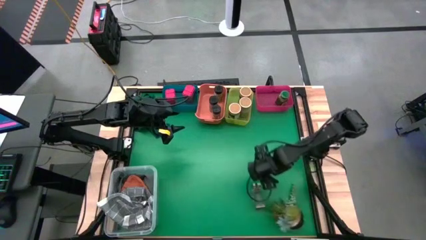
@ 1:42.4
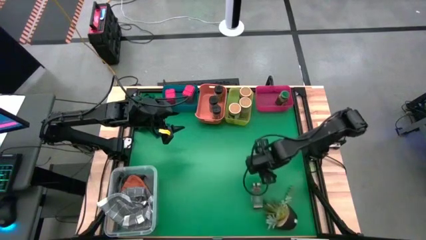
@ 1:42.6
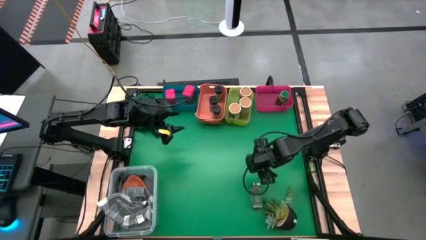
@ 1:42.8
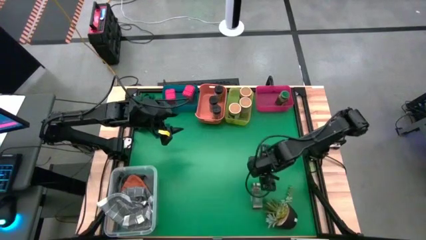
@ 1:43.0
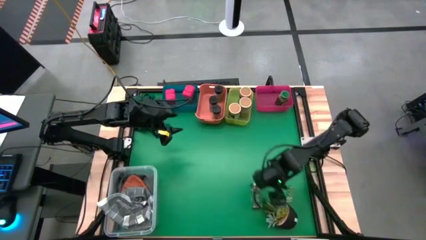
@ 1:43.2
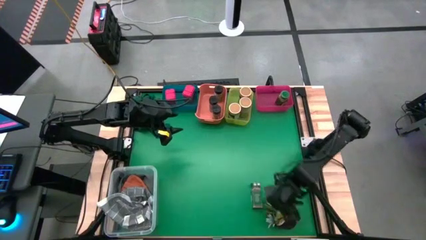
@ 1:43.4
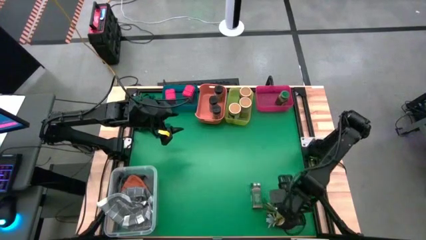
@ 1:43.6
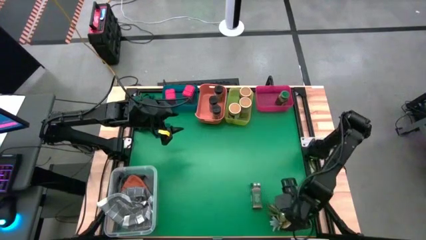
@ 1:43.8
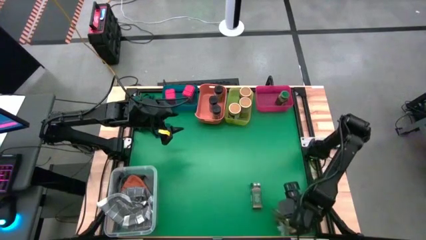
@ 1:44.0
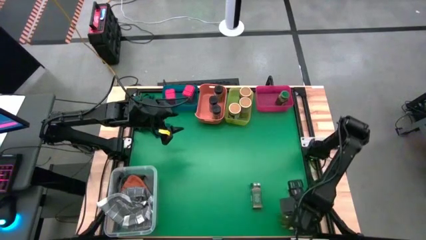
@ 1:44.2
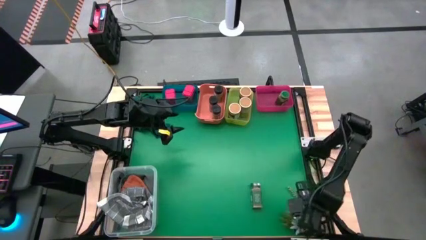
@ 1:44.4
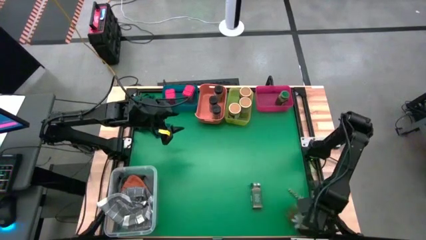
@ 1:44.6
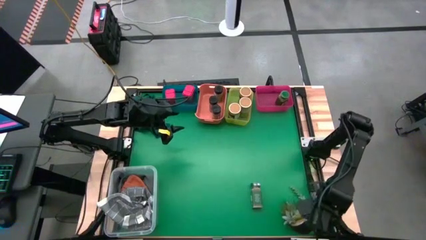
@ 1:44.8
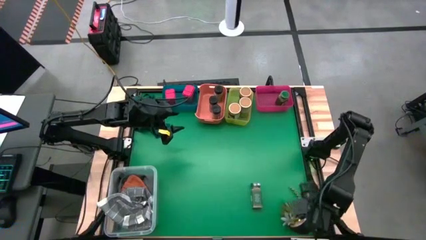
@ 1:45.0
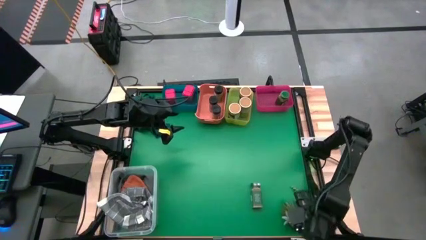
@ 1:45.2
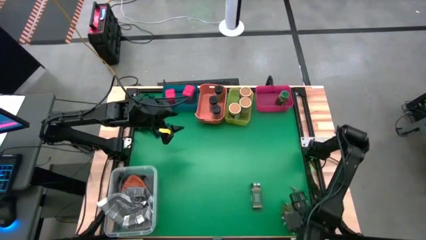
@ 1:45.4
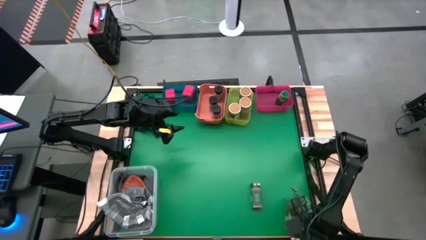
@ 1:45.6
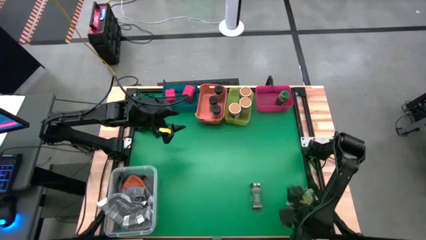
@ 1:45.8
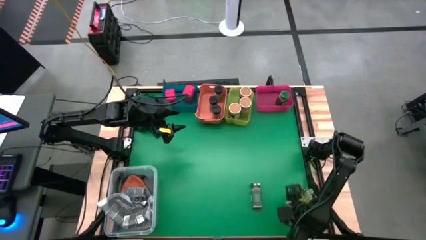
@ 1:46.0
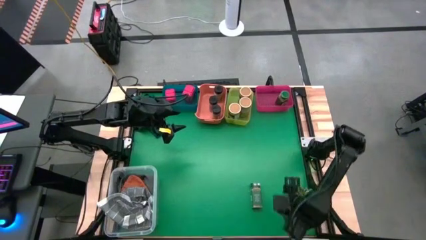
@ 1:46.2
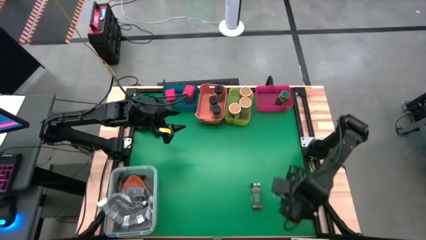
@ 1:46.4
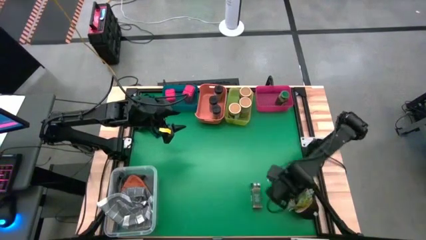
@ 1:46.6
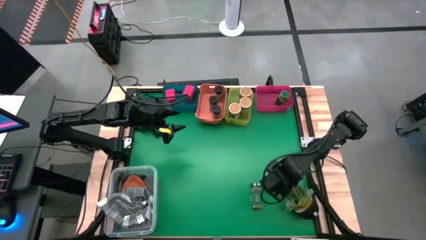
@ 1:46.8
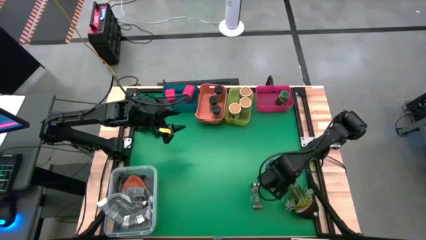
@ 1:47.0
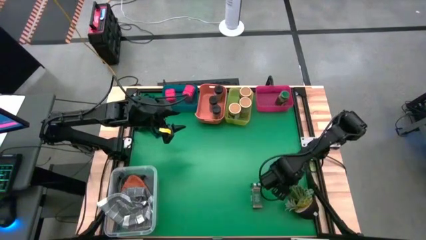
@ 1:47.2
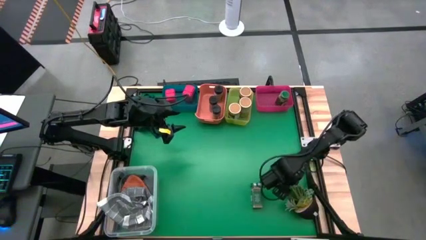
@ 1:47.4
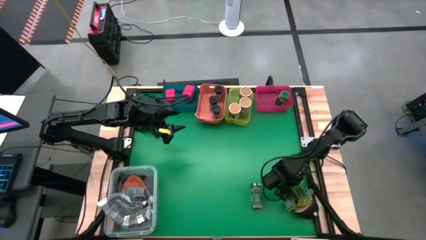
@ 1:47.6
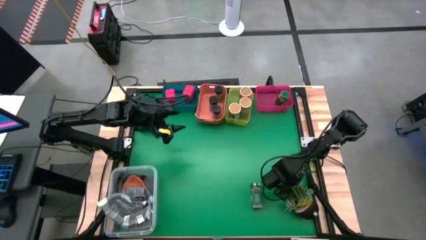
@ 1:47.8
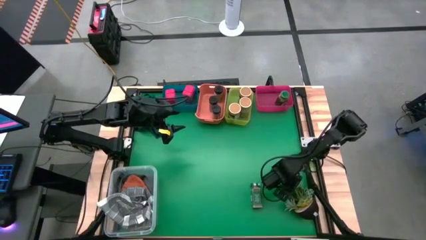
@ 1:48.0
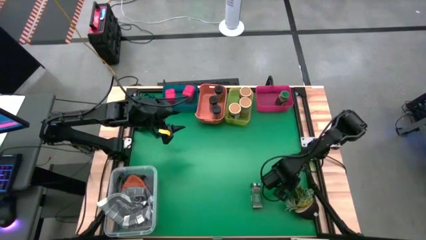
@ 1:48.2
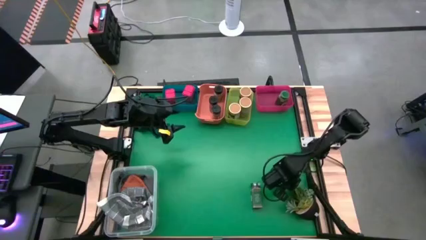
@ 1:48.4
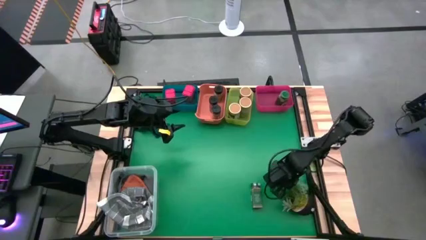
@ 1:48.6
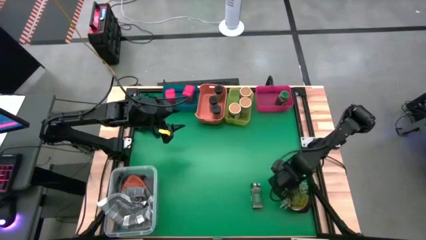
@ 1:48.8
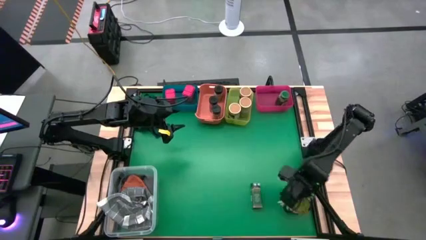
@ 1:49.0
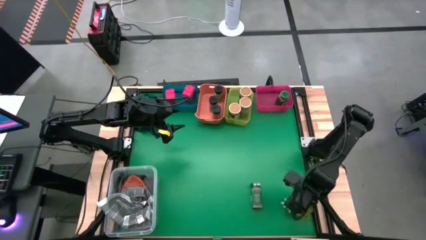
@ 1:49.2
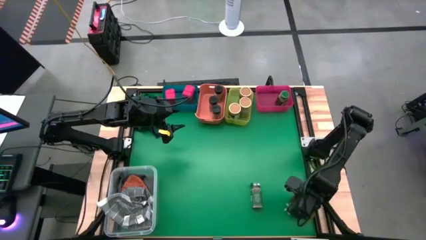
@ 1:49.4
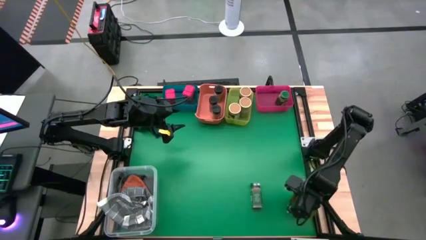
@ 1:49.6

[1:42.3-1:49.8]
Task: Sort spices by type
Adjust the flower pot

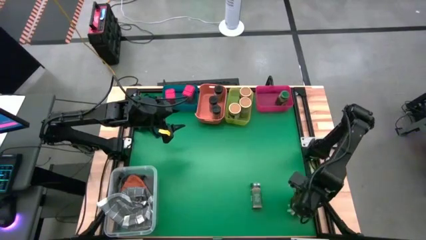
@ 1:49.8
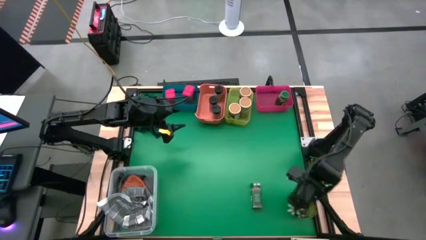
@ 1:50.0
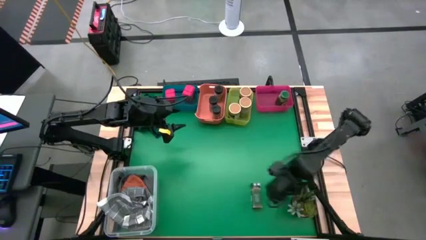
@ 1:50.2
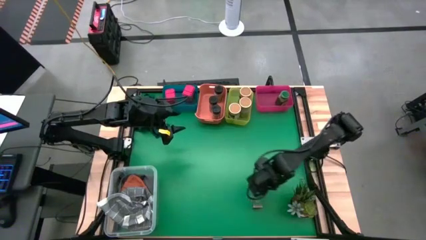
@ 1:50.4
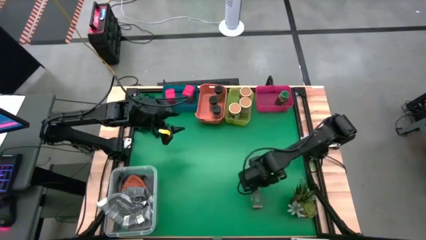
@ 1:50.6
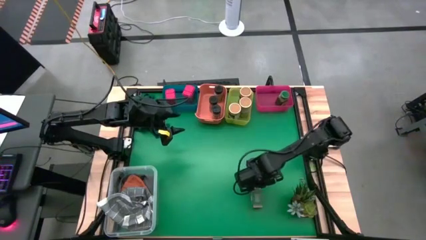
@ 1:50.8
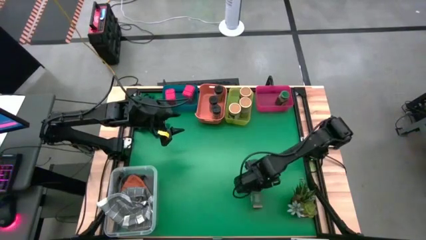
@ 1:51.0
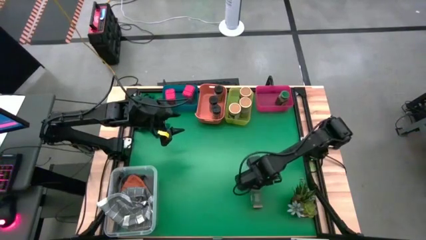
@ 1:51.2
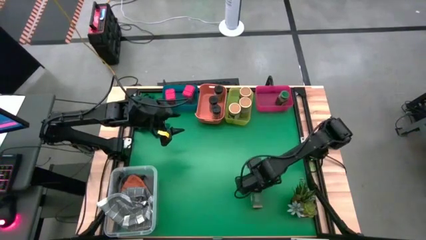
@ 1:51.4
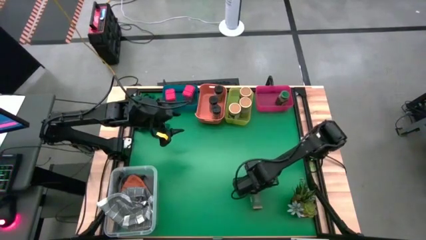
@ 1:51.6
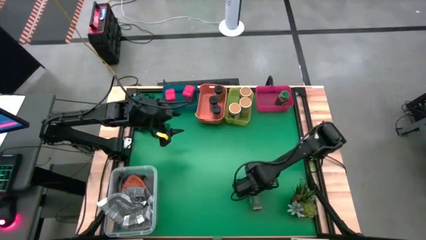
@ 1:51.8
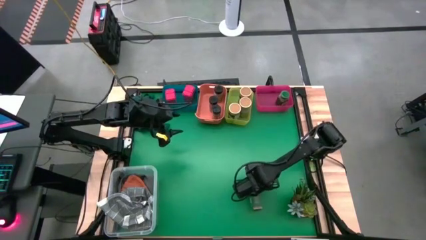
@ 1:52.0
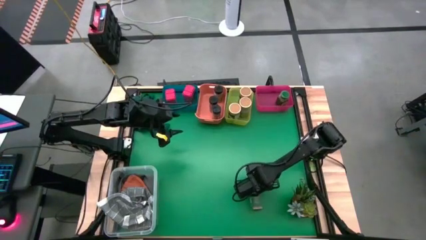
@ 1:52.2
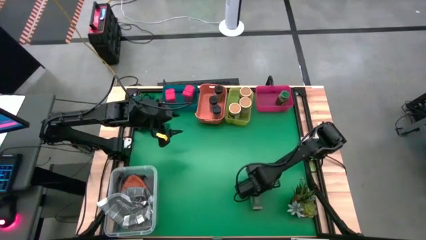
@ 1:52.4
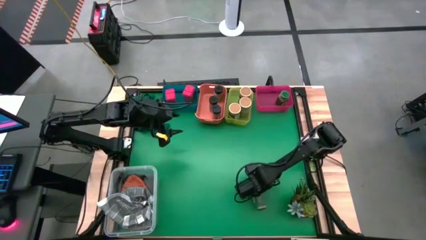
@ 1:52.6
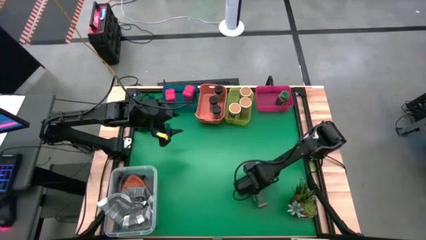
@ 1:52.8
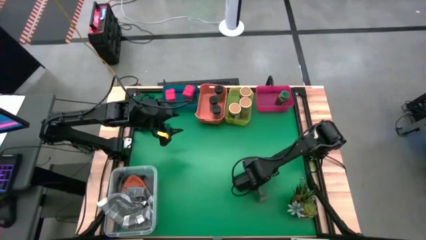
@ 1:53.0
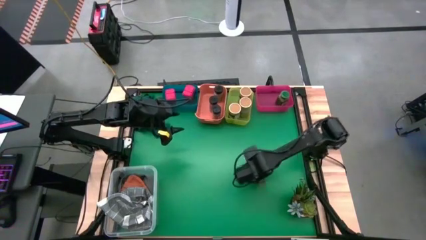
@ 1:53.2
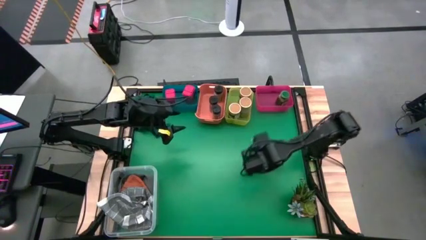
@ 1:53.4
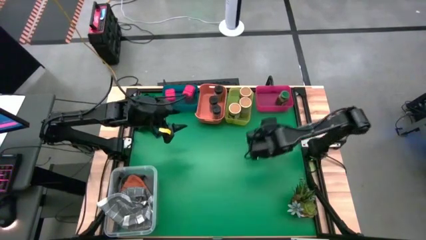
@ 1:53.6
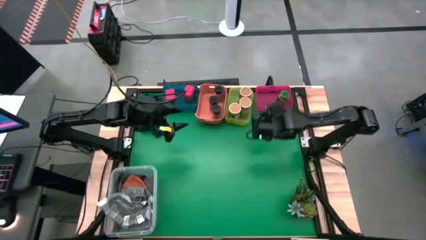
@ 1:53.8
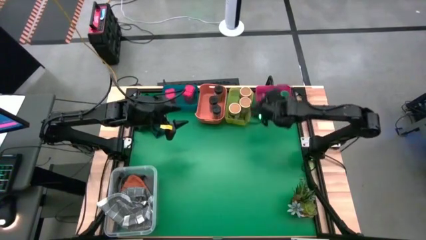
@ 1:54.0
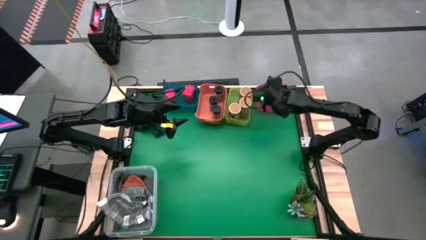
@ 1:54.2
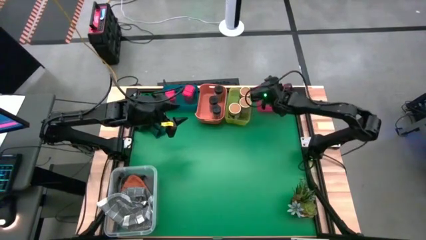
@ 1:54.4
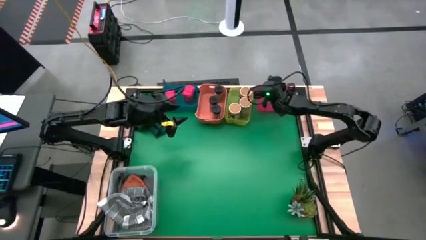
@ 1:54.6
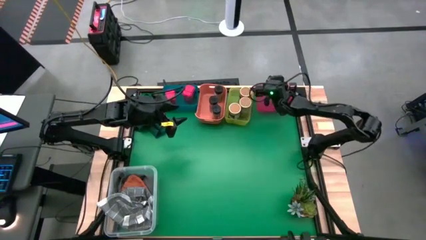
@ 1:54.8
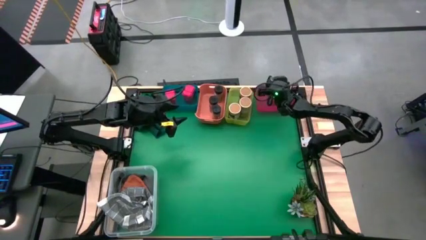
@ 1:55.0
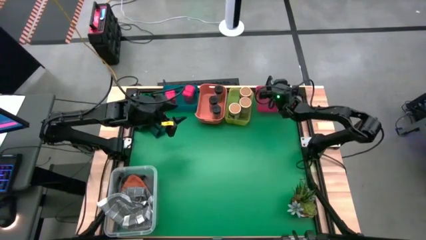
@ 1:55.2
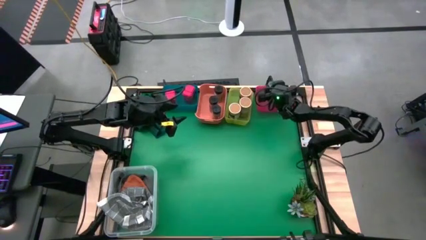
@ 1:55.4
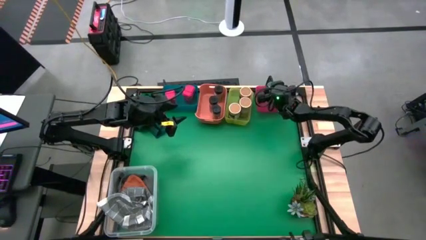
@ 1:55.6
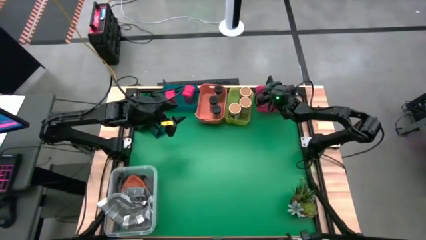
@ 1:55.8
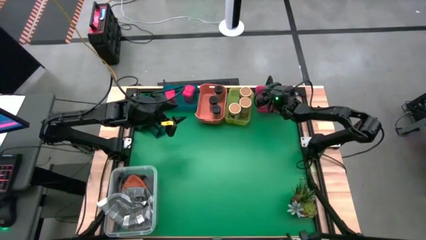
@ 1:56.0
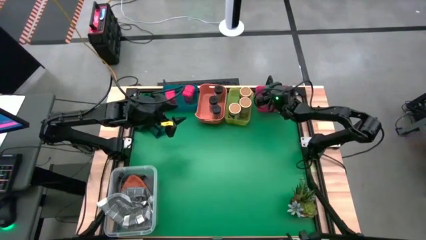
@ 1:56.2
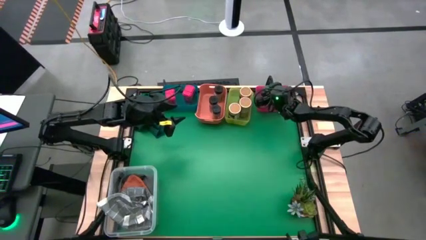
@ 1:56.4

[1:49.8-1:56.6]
Put the green seasoning bottle into the red bin

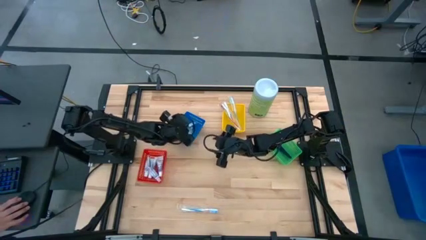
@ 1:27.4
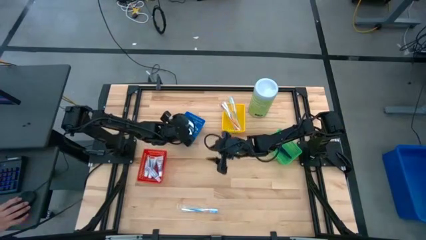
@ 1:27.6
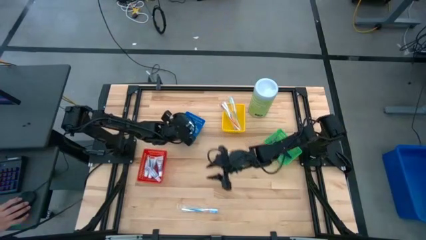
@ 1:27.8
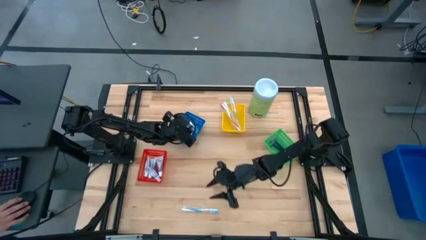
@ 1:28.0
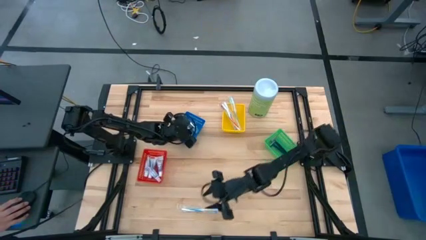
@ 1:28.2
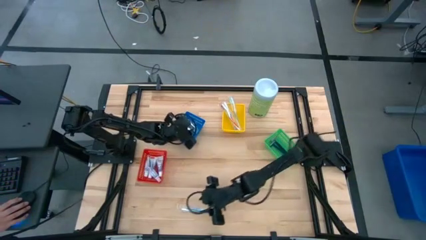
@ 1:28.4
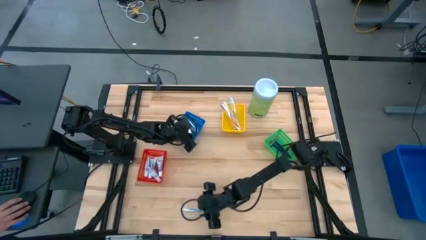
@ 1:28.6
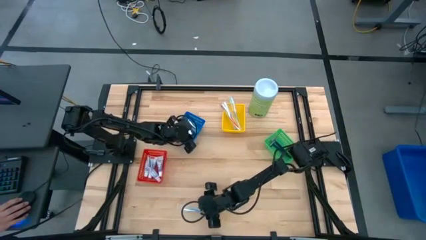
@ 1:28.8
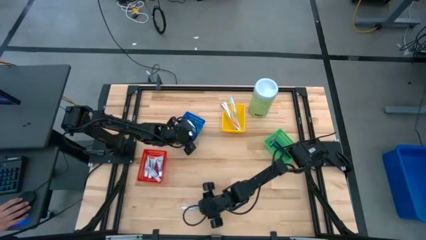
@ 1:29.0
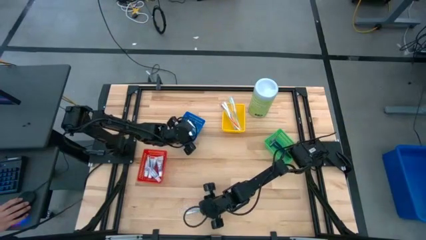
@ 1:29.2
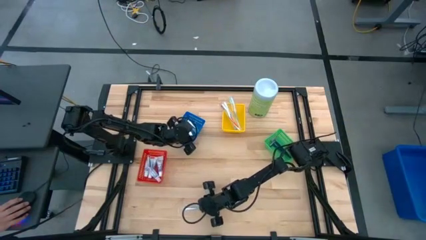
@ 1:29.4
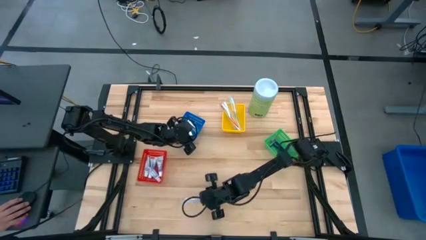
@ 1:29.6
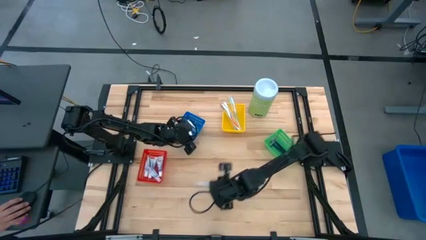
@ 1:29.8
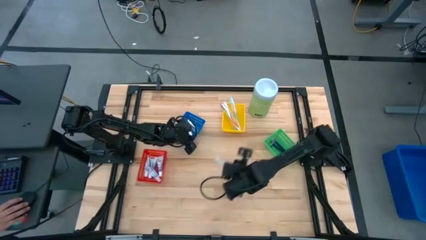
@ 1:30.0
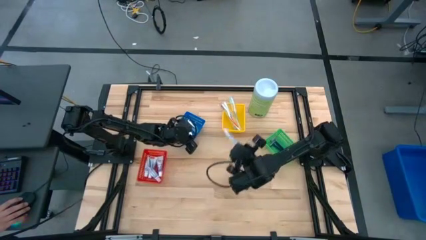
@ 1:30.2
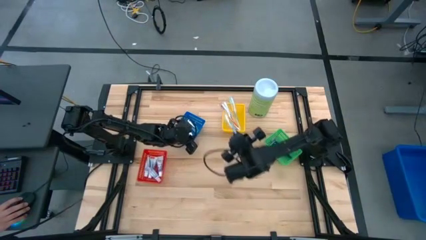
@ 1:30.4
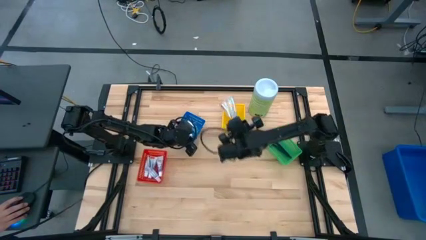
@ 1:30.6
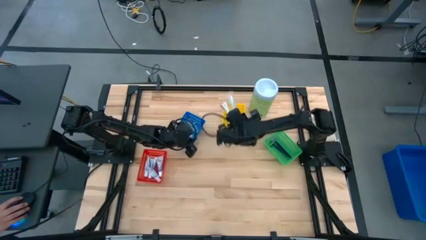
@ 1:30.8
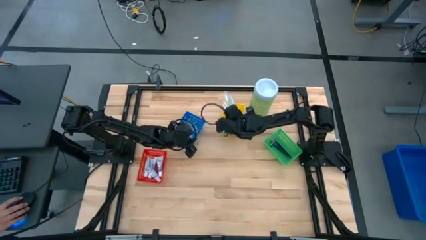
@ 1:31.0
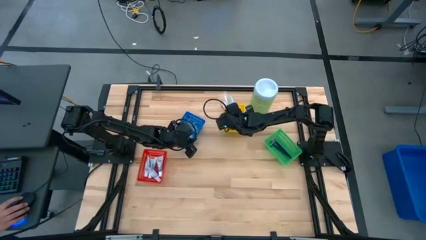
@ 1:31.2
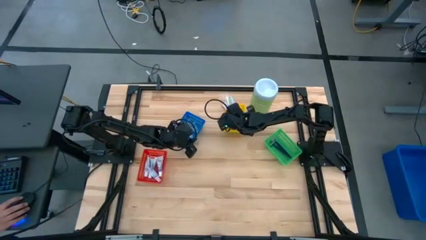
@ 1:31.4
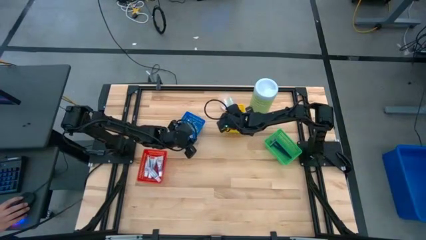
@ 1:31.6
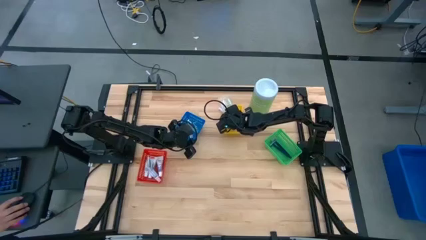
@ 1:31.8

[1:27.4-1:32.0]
Task: Pick & Place Travel size toiletries
Put the blue toothbrush into the yellow basket
